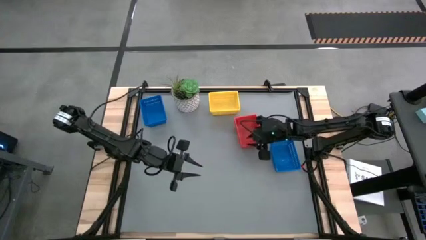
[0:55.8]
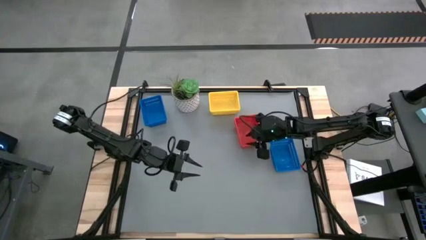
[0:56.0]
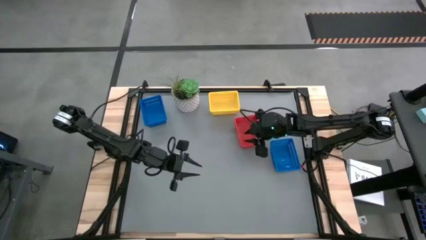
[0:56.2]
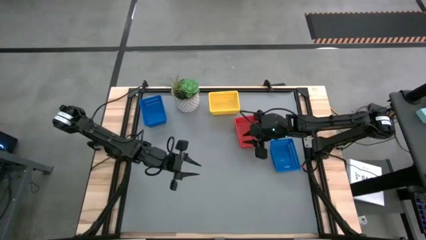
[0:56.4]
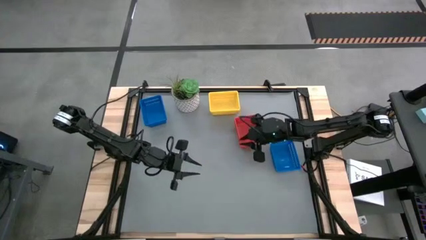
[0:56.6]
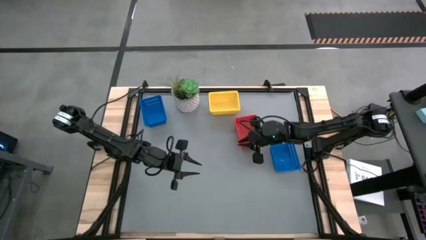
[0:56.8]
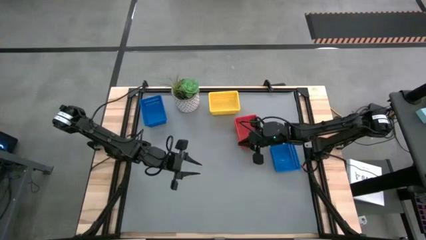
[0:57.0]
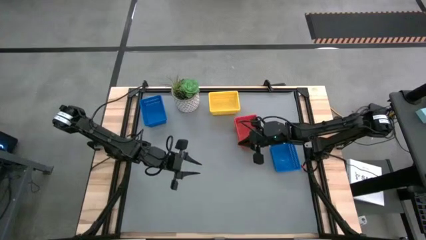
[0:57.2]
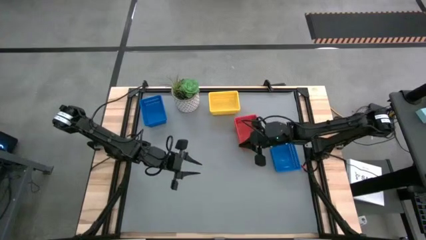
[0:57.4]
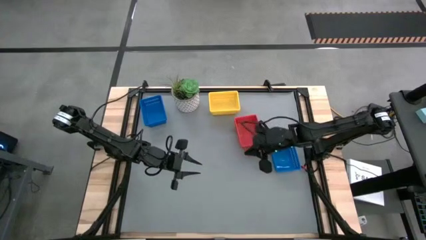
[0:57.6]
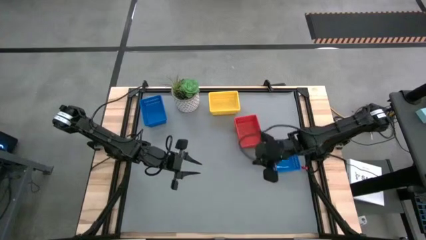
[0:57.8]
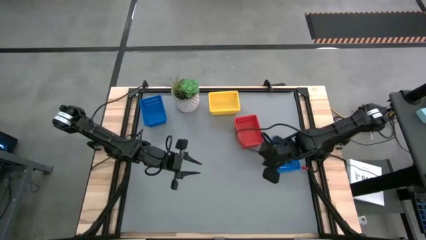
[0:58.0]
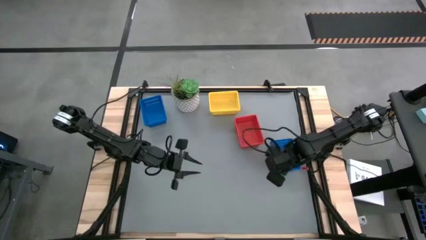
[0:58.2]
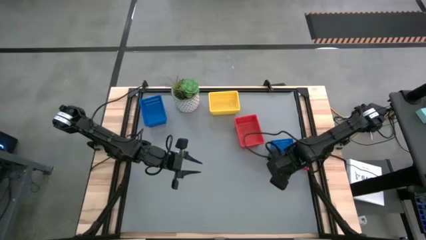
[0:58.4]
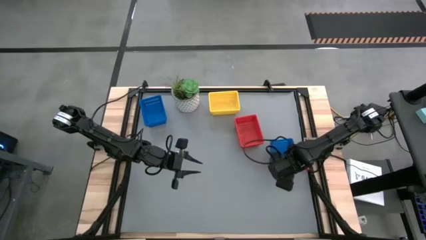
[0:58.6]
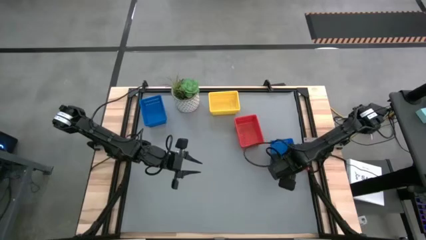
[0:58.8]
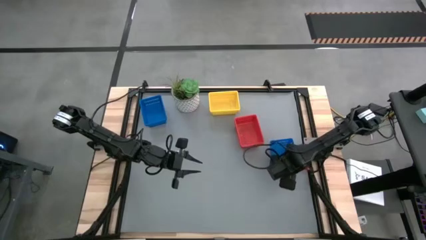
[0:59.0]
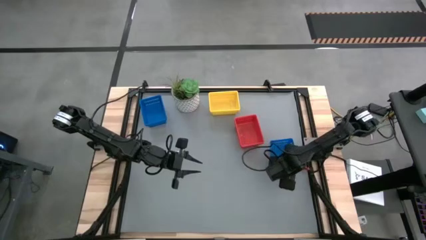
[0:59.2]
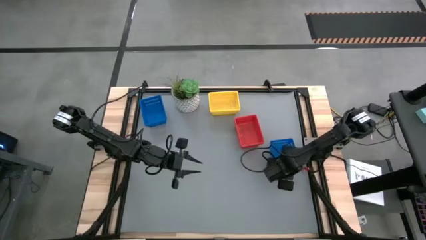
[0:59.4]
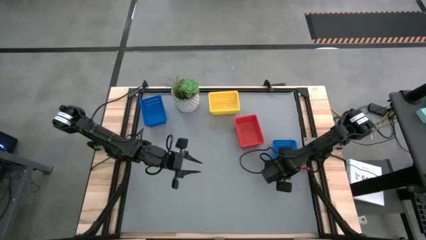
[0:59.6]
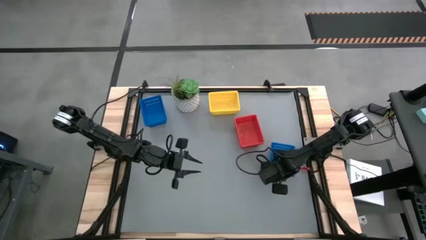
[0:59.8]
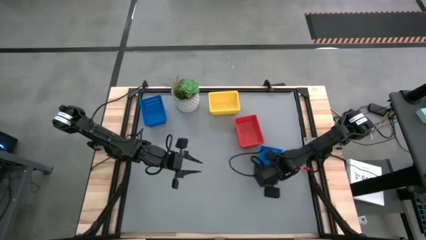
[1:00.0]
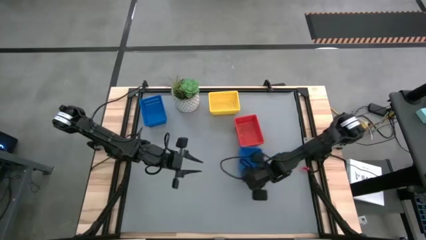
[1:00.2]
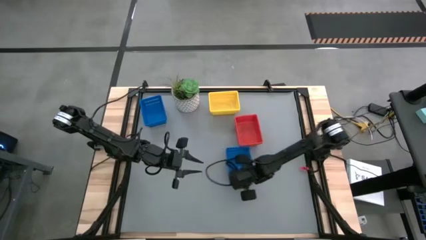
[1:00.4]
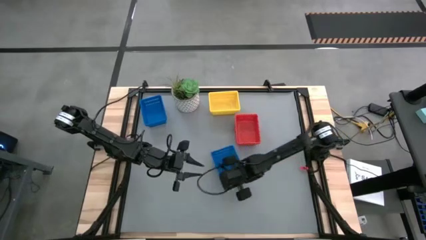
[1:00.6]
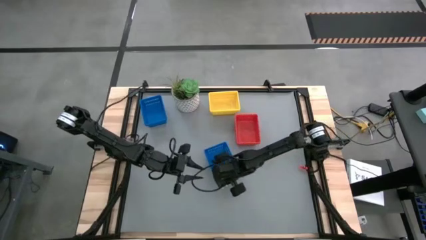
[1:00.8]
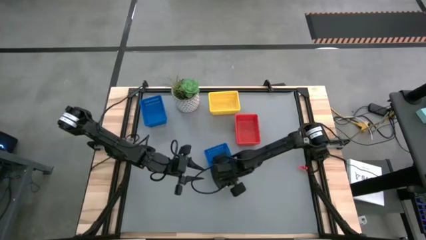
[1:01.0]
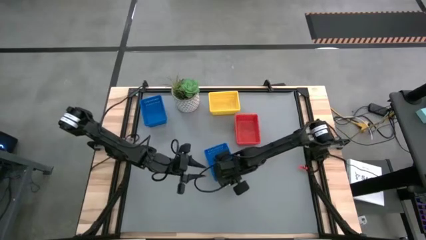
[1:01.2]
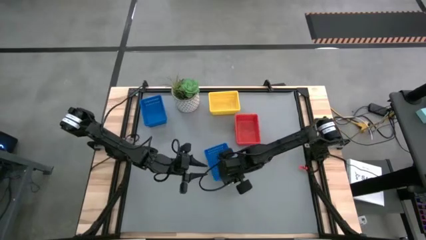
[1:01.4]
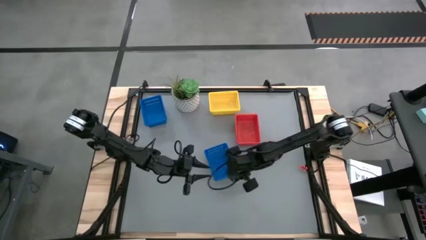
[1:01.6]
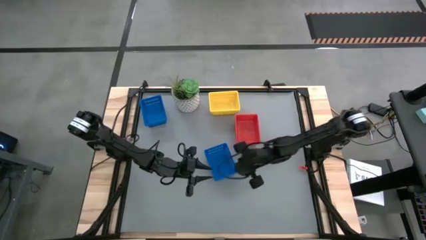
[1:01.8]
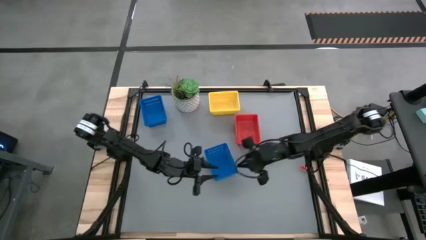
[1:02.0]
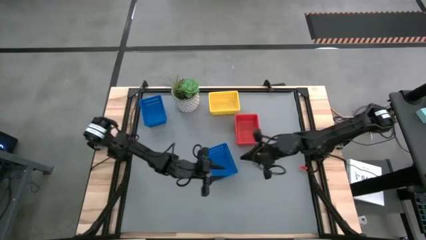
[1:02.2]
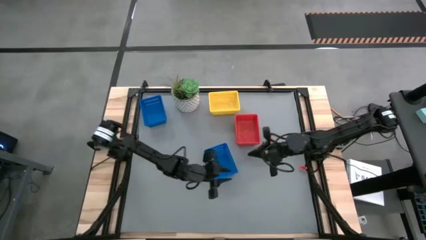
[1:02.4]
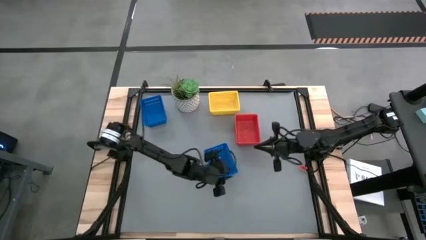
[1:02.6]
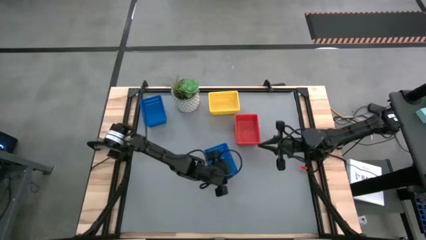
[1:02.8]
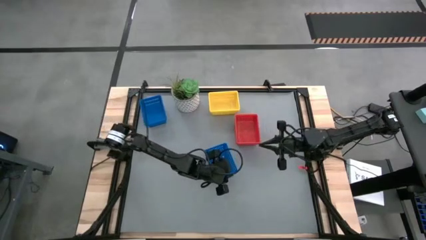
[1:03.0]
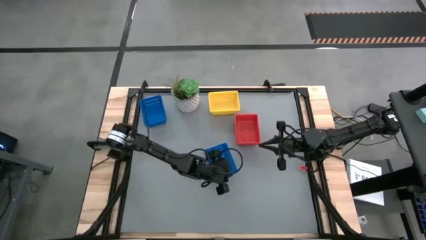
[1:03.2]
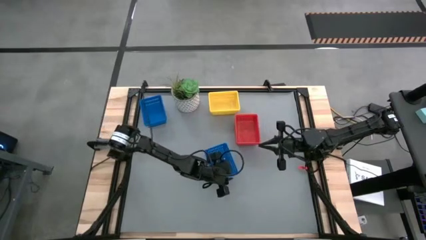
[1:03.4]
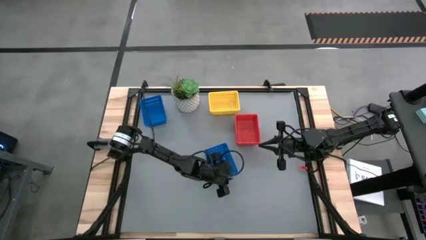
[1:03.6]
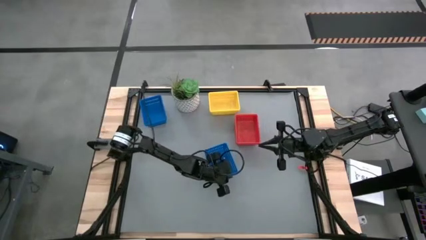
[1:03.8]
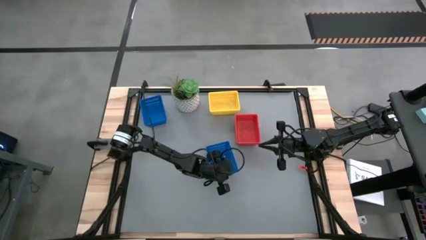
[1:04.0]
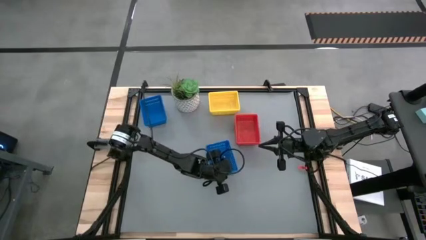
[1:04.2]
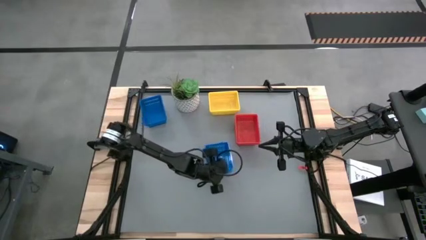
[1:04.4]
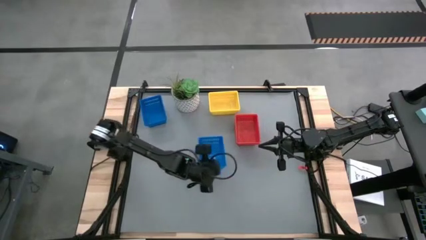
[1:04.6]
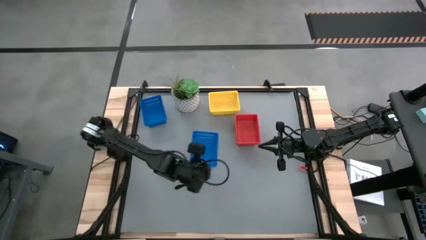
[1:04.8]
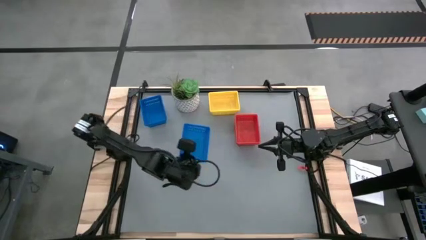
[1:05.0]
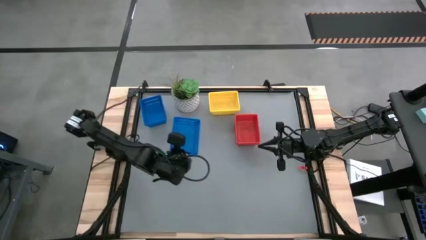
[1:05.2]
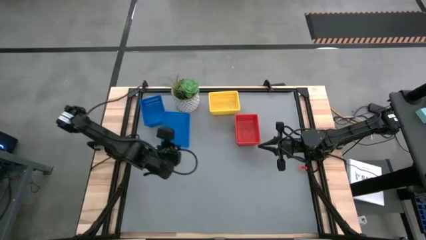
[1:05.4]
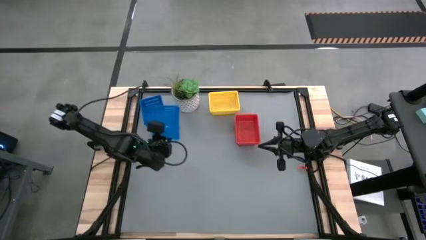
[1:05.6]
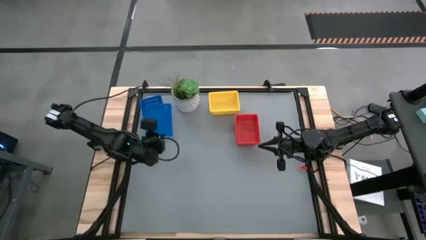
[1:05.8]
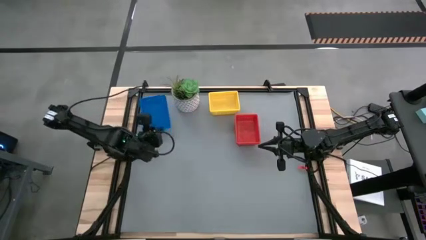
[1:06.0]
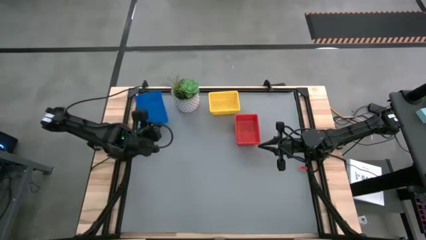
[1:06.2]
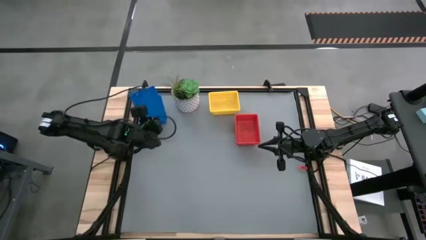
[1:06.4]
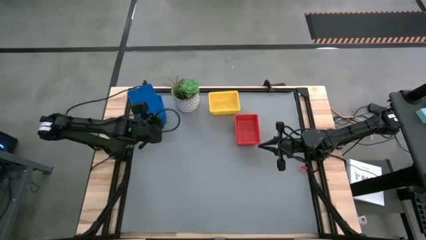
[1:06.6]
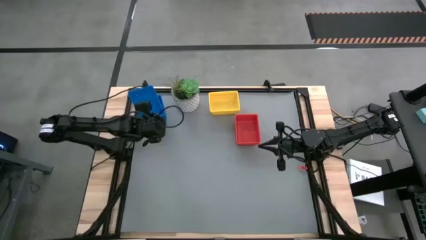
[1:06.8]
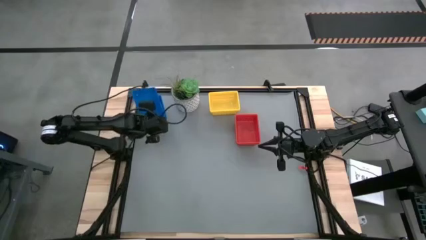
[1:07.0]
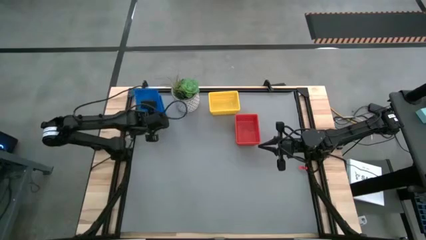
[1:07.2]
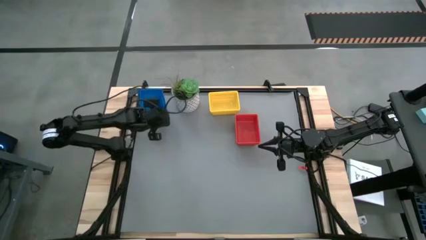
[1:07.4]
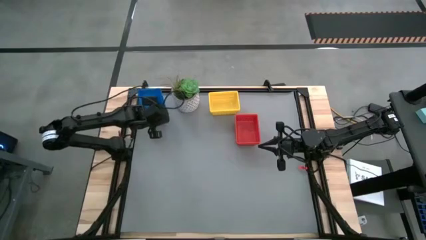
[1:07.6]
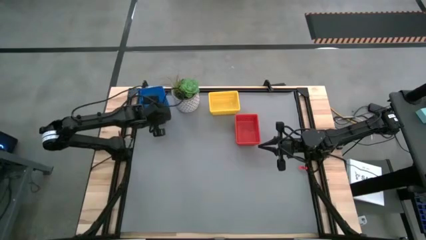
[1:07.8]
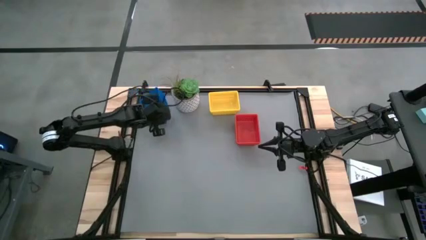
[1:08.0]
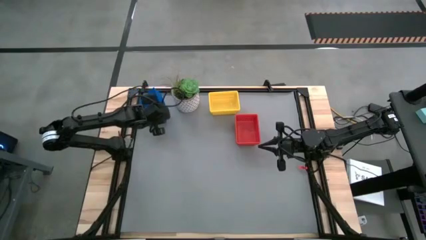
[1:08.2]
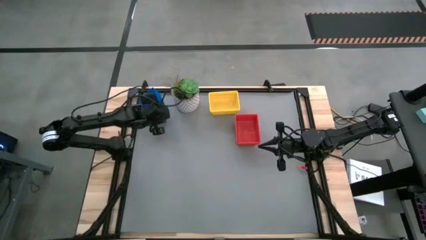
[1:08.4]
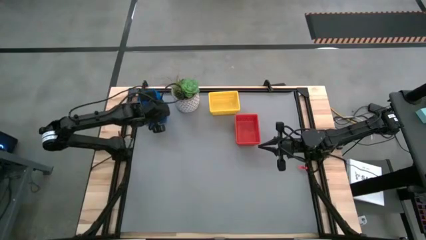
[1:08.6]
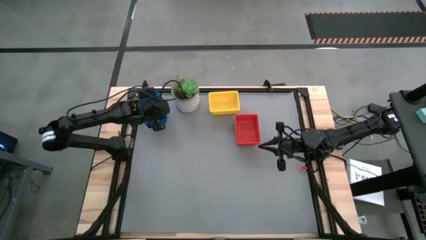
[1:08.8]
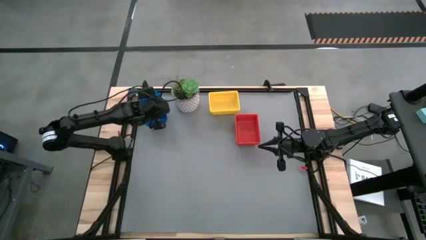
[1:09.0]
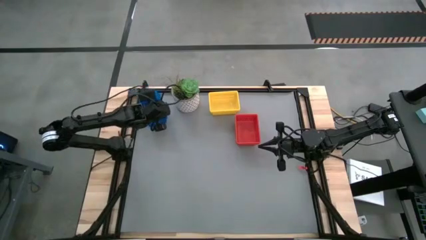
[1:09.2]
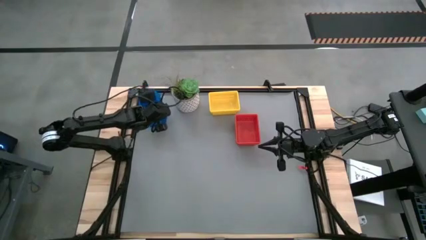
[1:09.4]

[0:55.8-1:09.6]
Stack the bottom blue bin on top of the top blue bin
